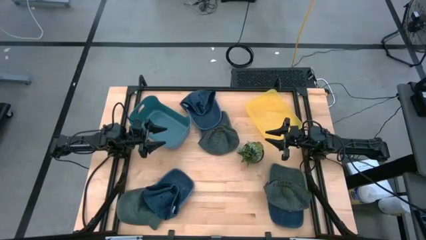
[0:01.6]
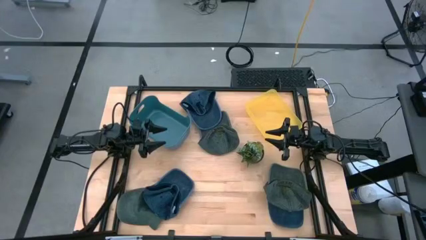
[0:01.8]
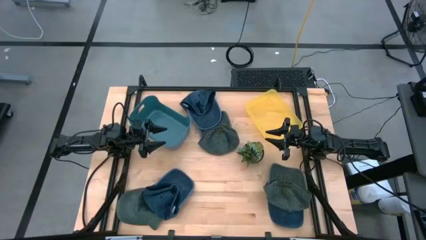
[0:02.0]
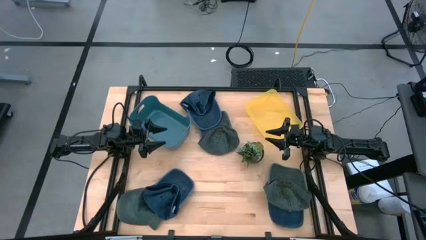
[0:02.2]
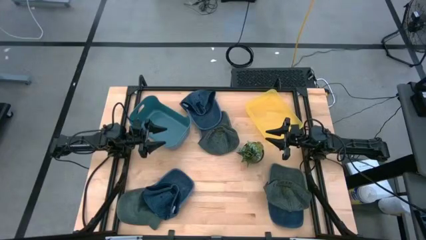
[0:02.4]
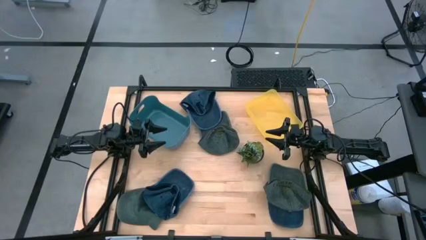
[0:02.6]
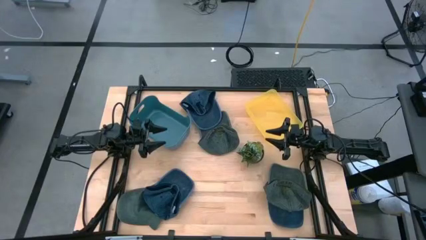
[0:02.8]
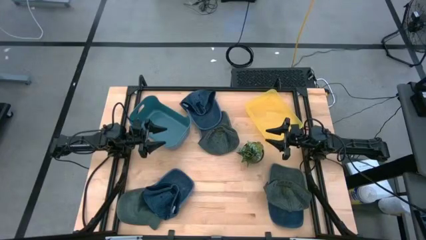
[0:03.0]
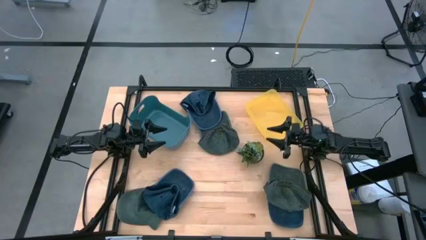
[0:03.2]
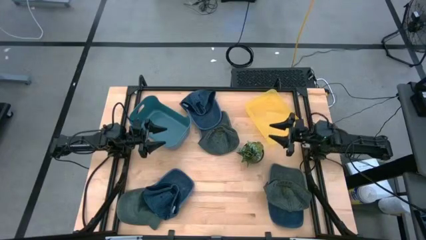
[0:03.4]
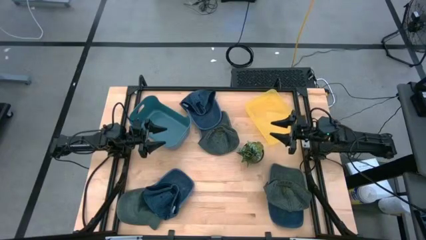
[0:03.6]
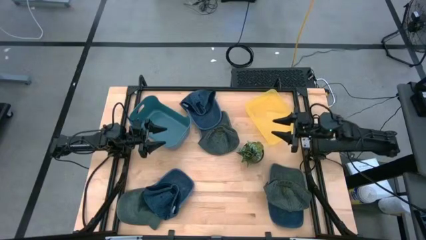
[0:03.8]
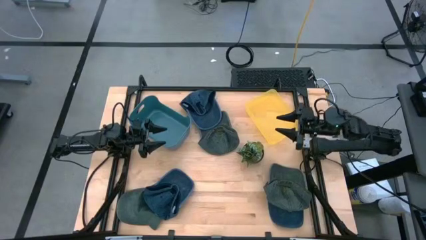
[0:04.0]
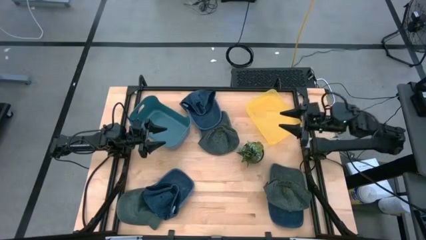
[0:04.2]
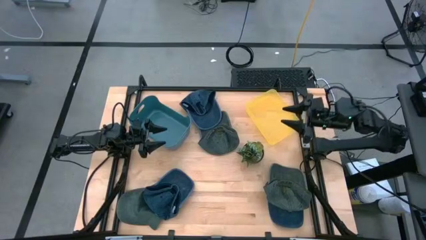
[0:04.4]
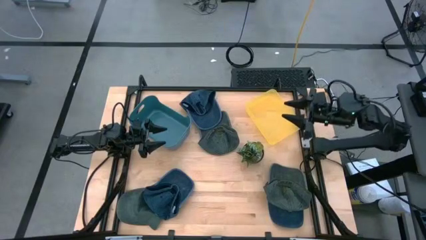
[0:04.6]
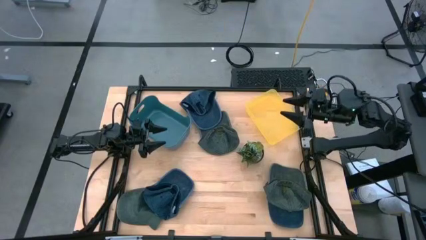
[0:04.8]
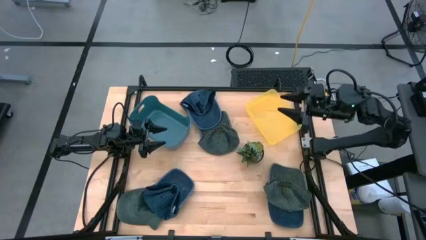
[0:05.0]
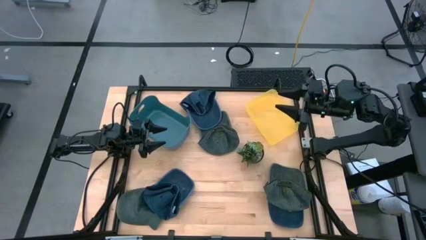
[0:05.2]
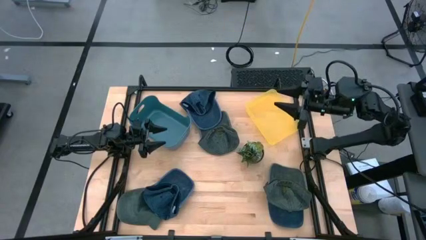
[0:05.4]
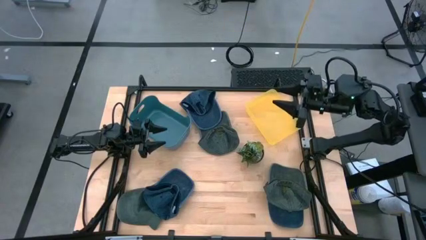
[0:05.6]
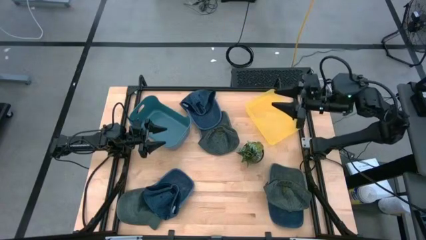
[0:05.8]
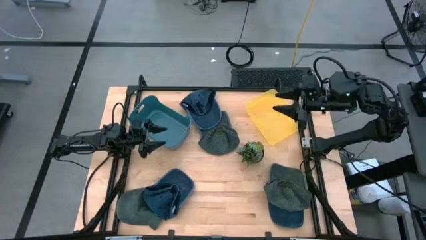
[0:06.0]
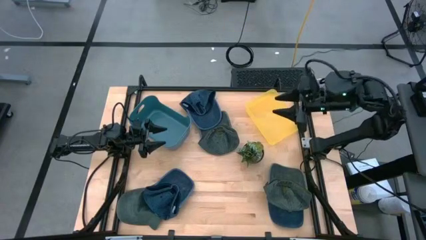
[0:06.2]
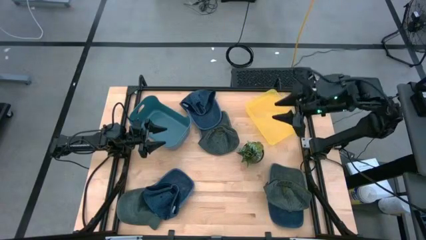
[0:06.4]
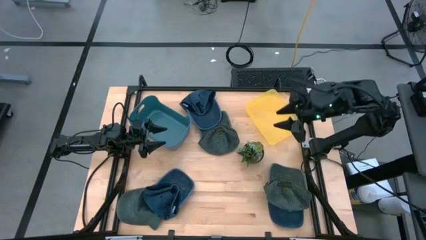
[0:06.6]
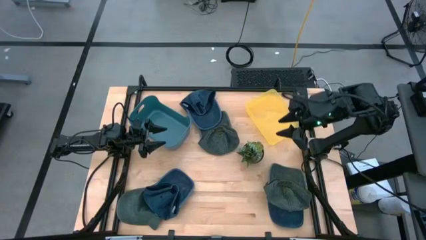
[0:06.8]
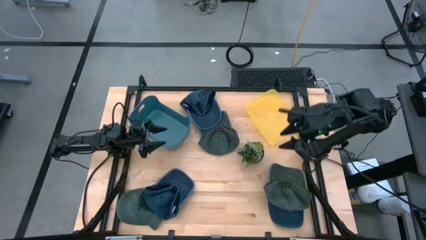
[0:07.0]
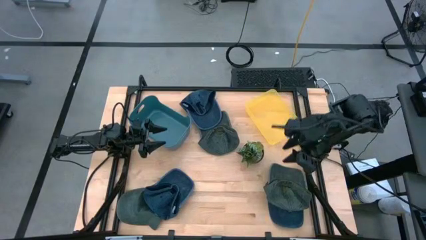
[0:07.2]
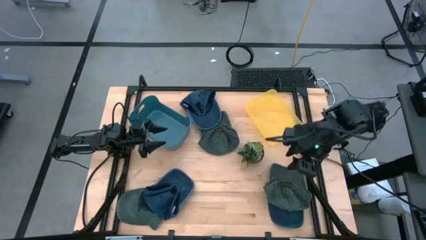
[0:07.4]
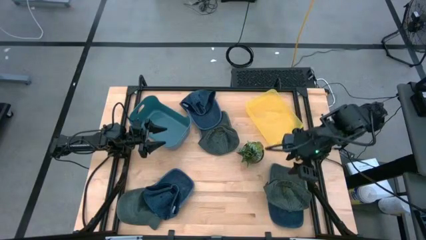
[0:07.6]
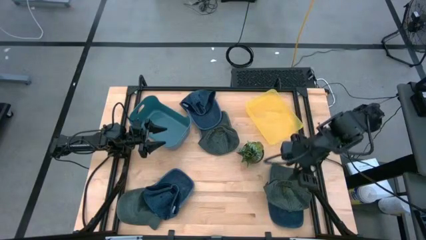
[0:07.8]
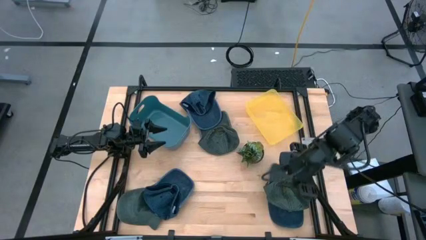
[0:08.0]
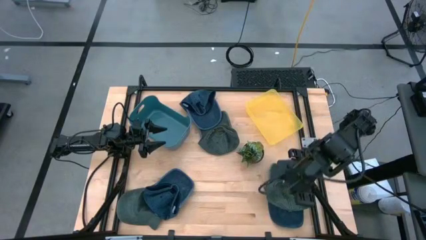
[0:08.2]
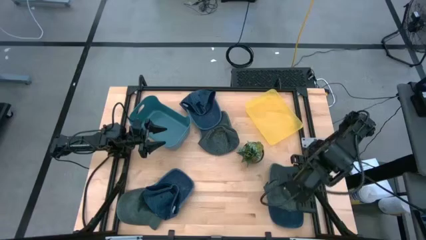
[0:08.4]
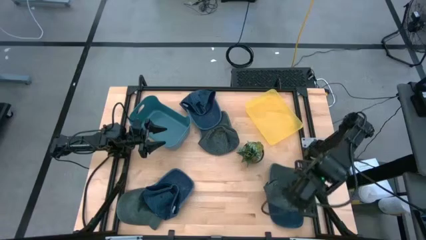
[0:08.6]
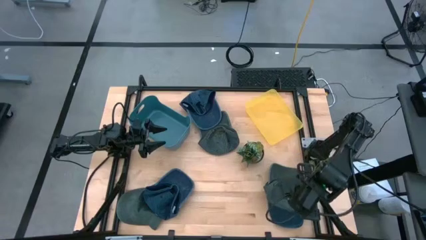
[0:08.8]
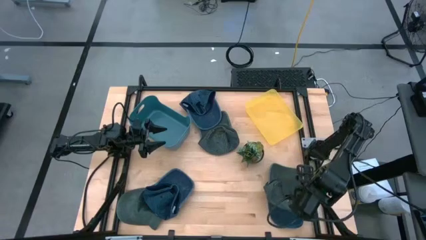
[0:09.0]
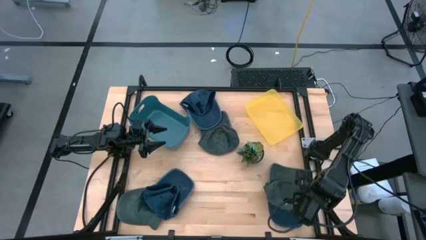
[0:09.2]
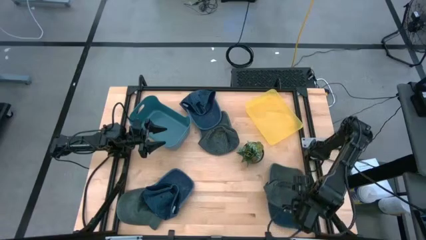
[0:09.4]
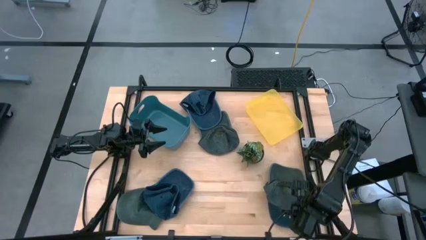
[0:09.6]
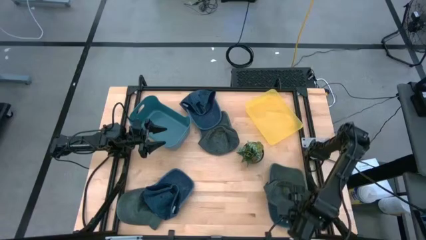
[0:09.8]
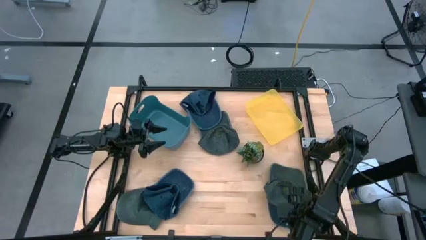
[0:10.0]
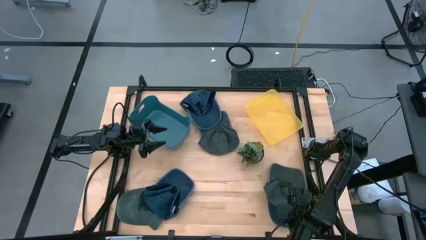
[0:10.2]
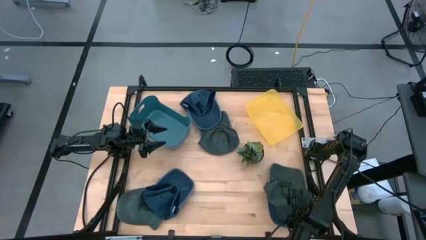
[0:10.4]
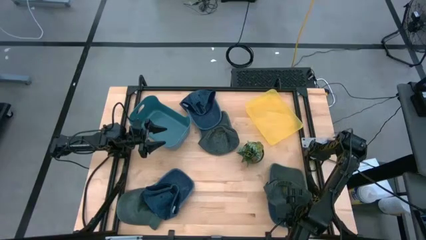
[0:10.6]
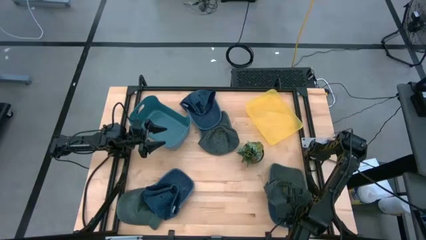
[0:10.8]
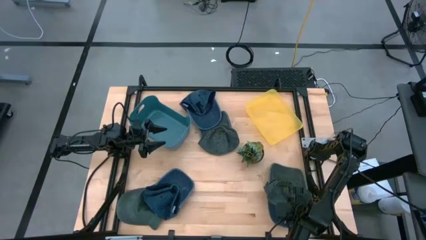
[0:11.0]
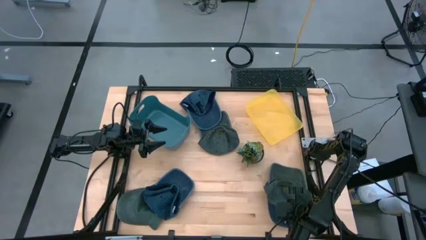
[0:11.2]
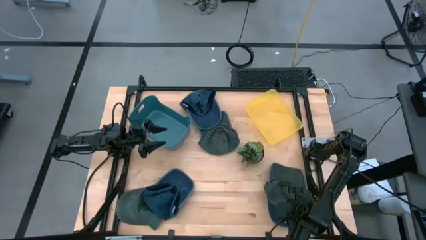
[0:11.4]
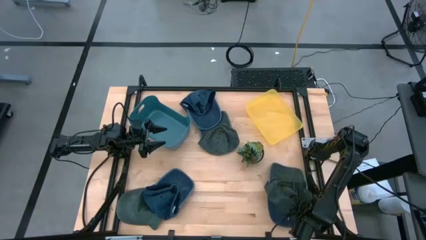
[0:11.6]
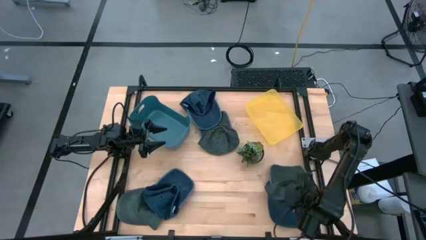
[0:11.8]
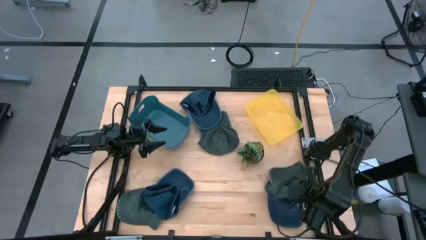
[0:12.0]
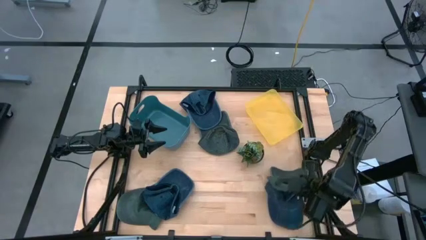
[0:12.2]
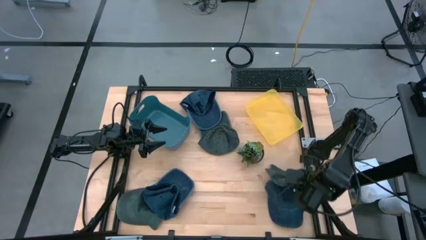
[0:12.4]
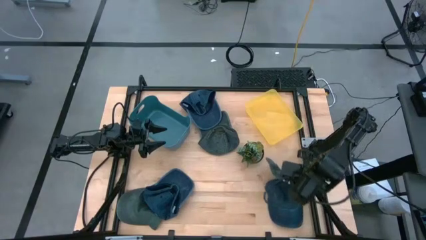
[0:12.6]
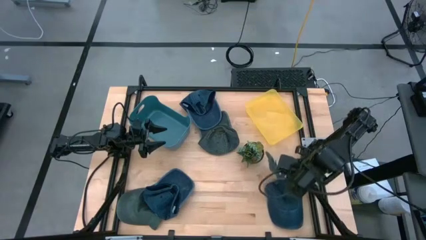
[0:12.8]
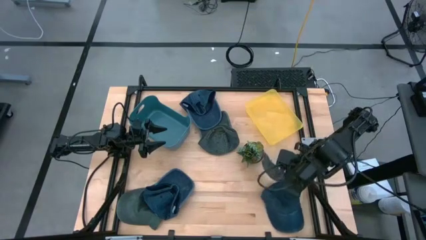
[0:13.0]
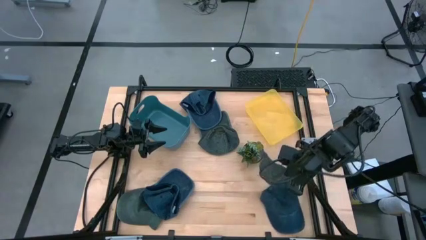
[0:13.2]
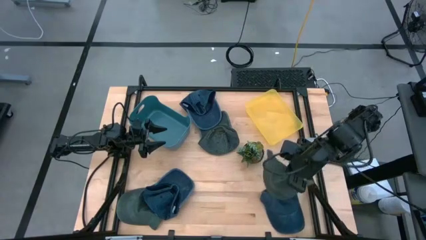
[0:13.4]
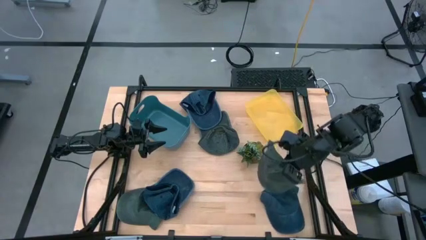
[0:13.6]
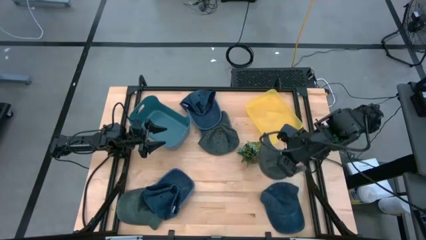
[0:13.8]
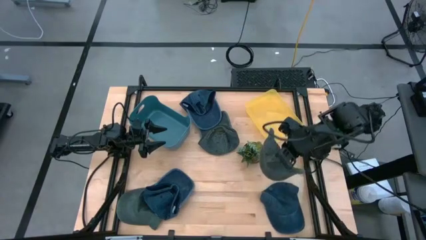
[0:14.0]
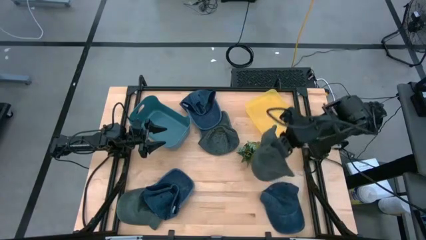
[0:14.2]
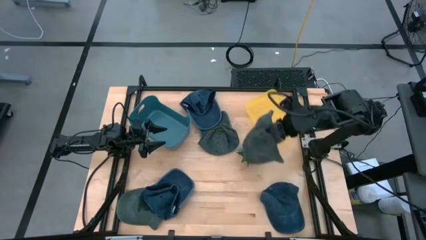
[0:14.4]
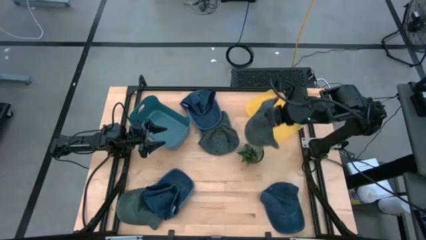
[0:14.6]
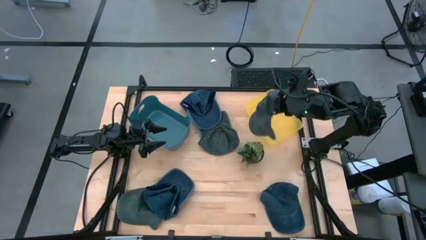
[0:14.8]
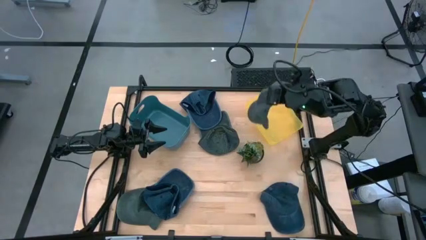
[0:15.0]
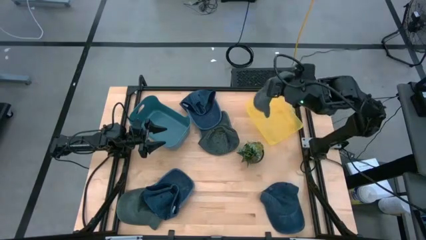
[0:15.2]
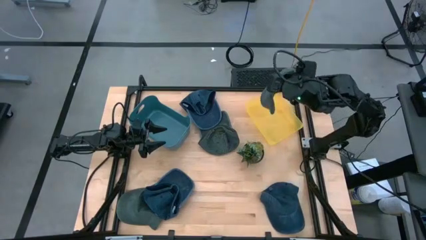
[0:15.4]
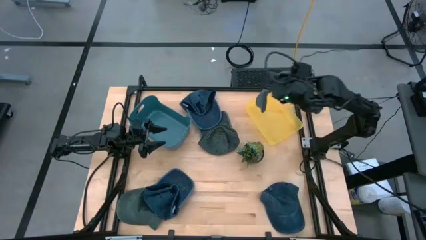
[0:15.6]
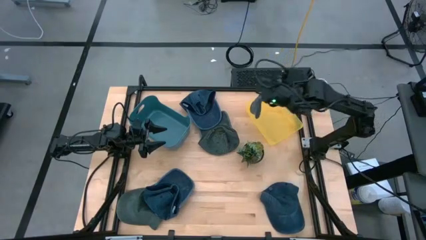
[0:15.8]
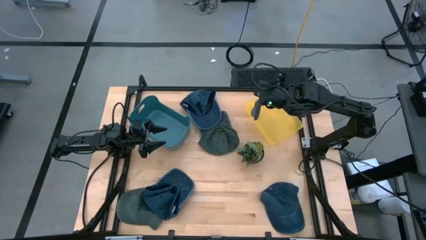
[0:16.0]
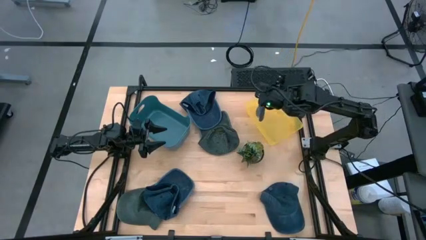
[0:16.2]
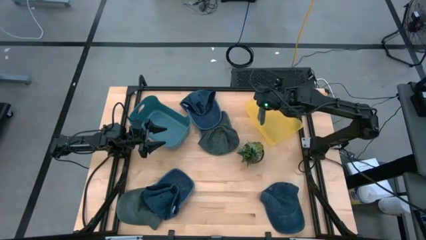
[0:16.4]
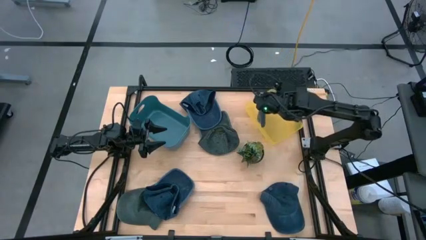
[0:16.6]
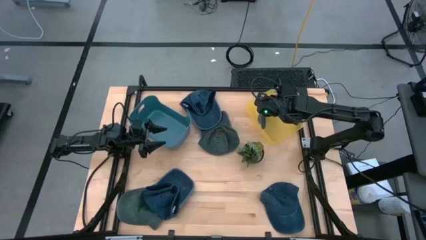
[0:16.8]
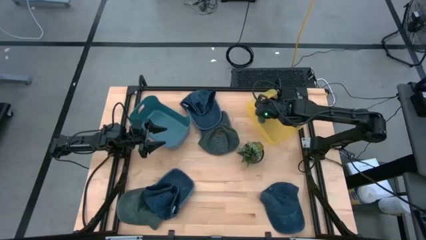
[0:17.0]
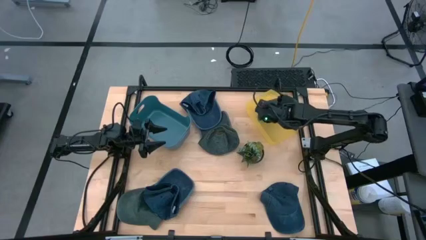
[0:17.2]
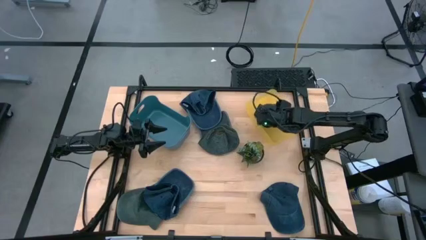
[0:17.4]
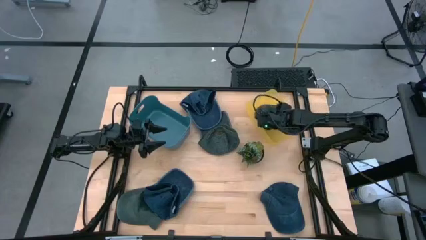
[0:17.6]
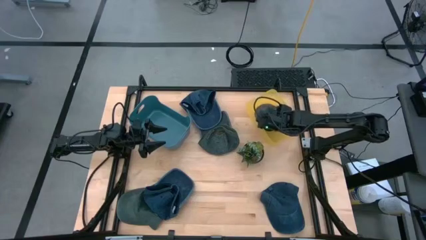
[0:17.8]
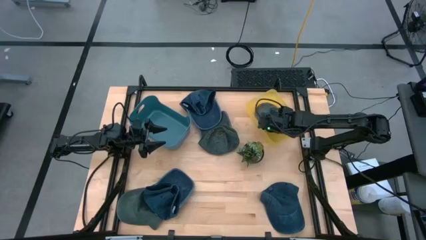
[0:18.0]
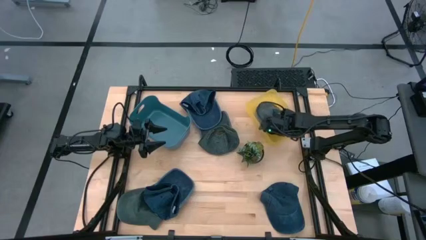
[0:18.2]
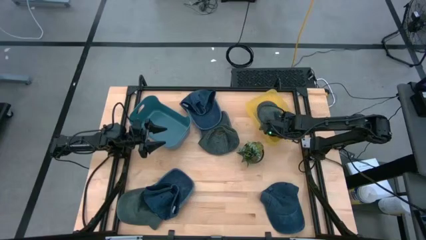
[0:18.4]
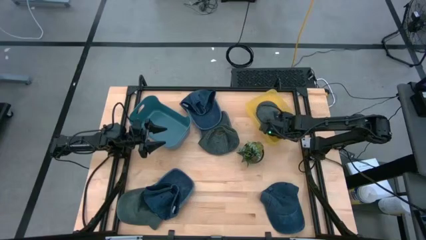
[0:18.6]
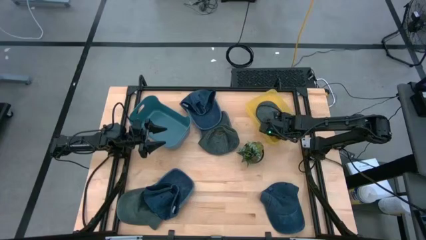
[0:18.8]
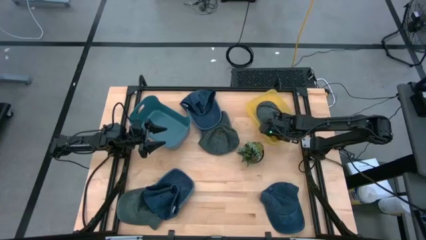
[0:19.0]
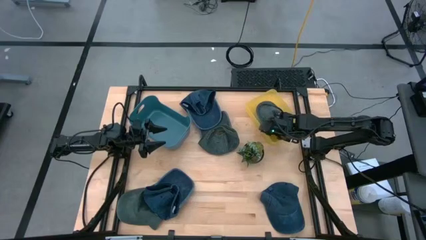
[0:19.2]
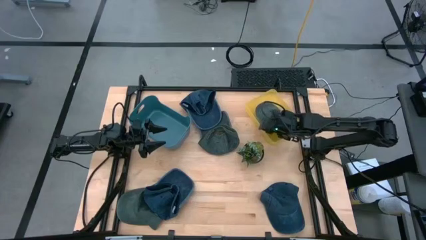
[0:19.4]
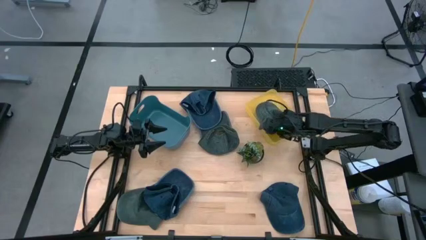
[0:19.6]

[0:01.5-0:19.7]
Task: Pick & Place hat
Put the bottom right gray cap into the yellow bin
